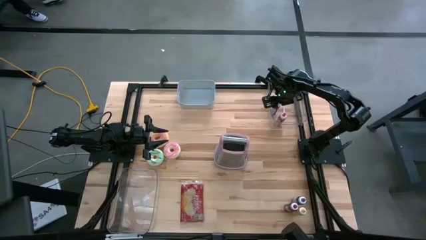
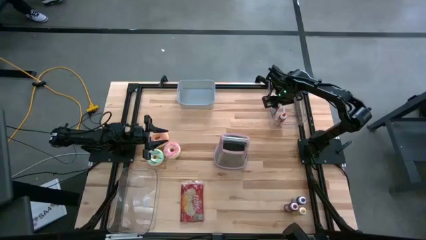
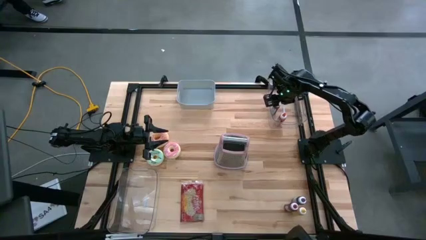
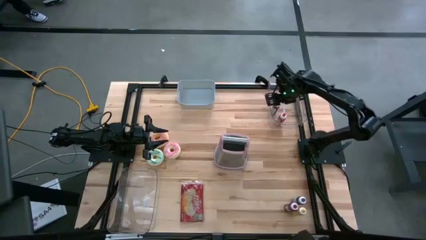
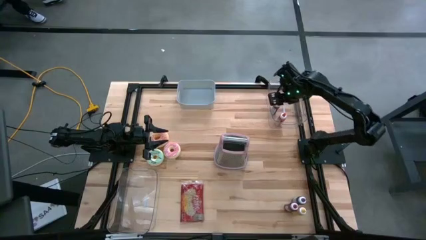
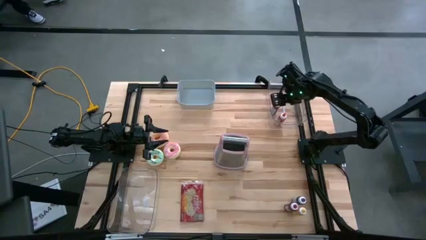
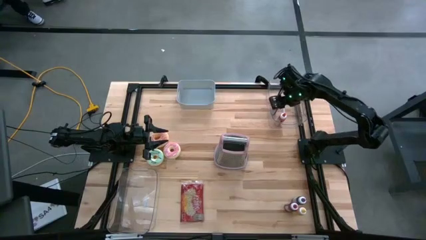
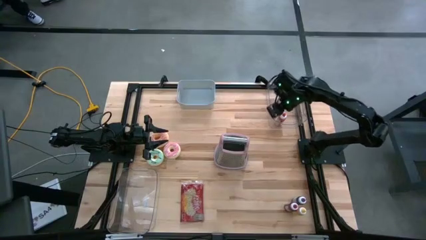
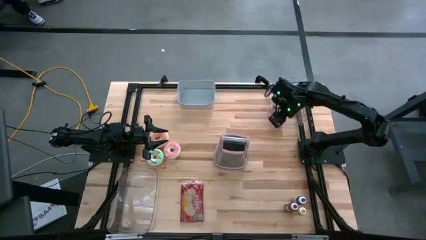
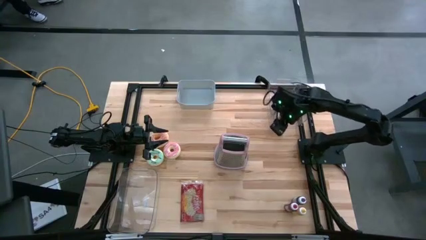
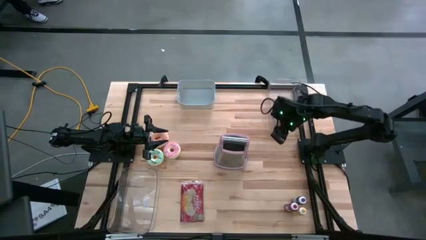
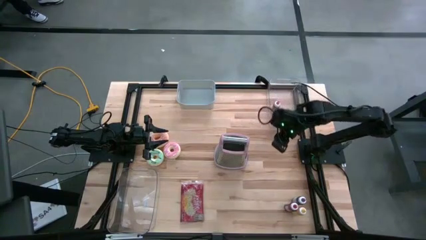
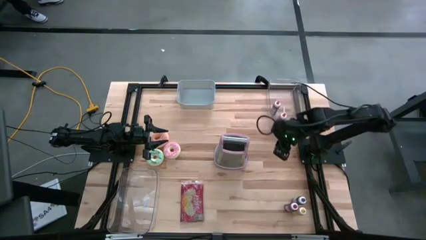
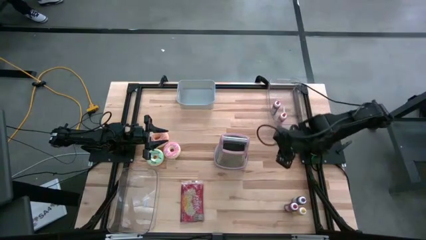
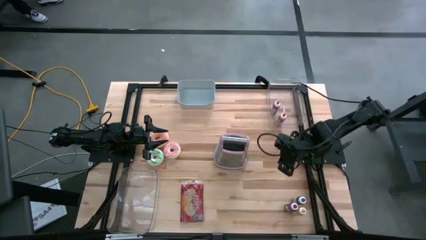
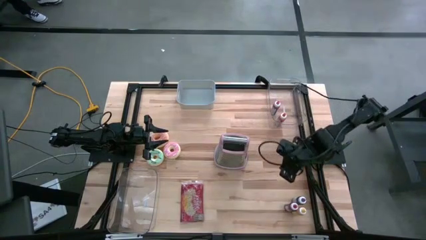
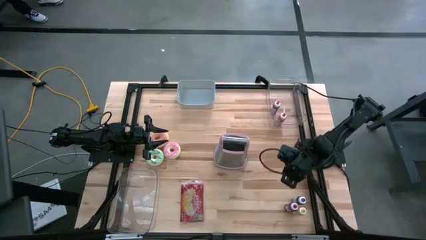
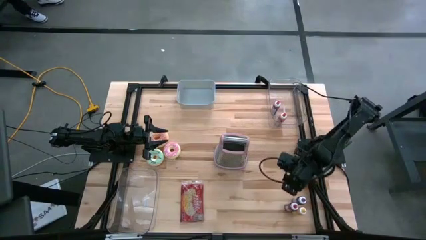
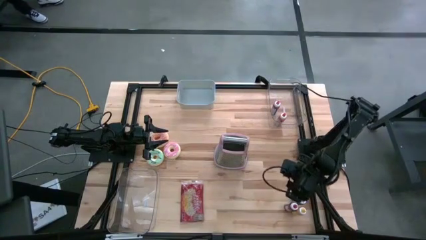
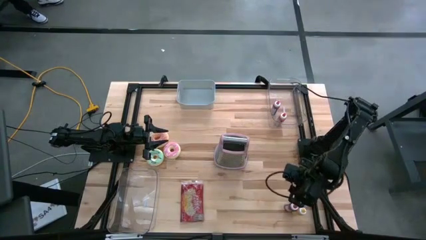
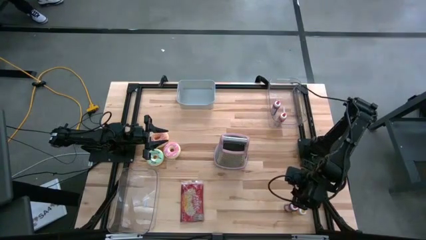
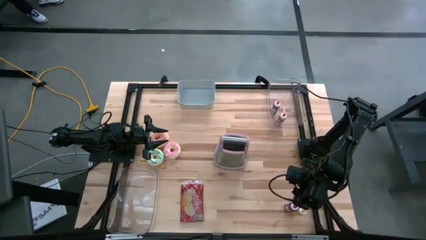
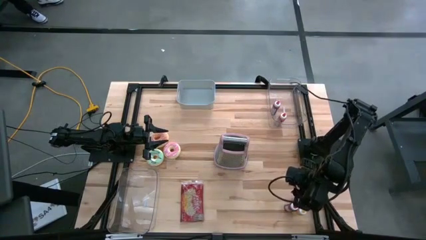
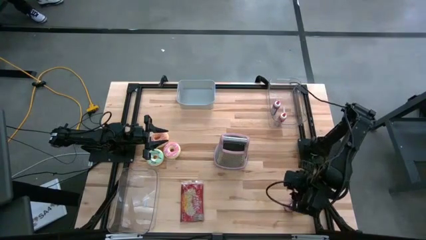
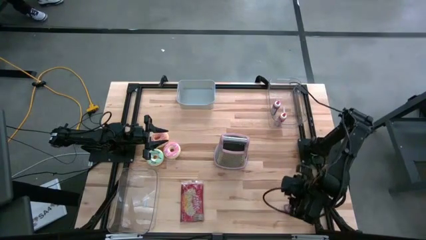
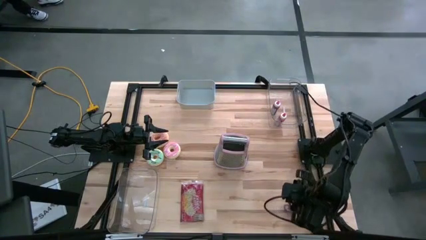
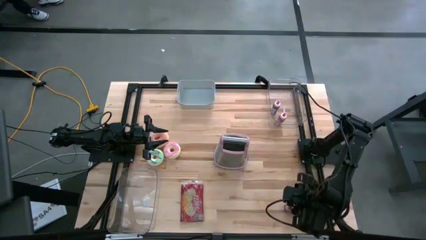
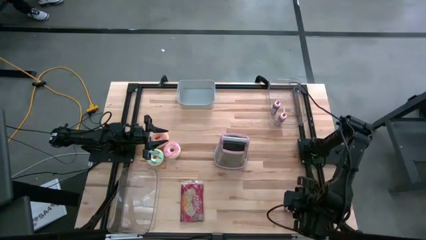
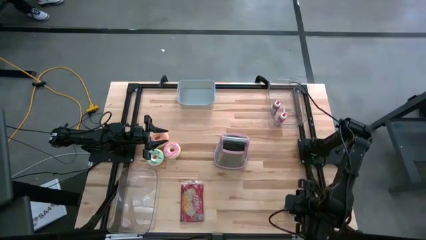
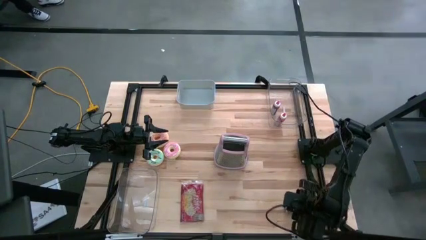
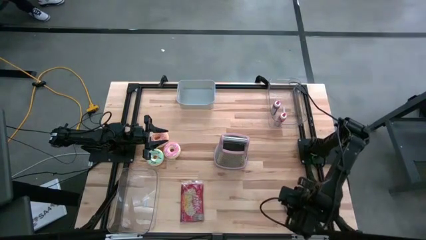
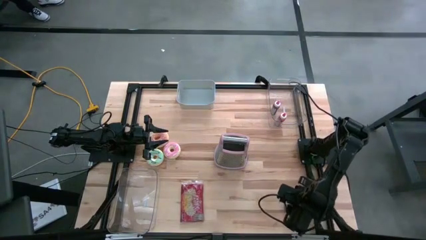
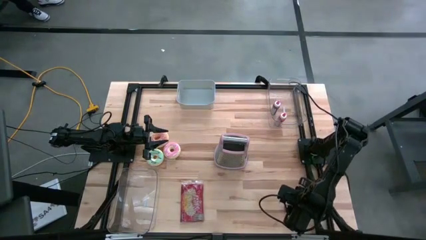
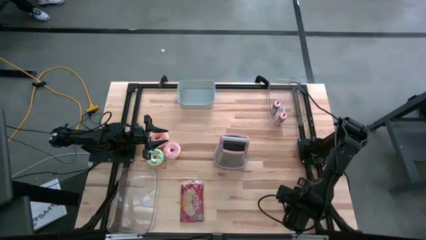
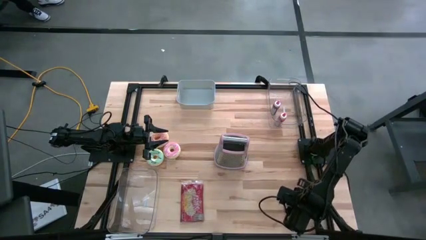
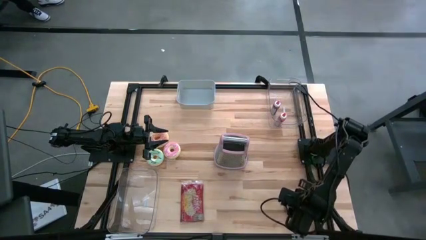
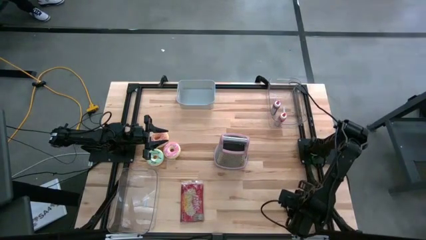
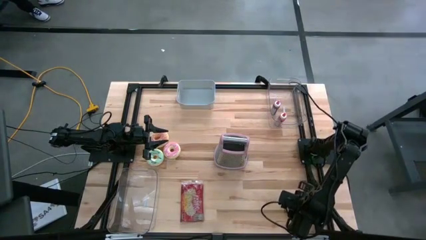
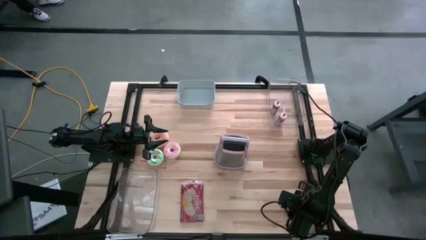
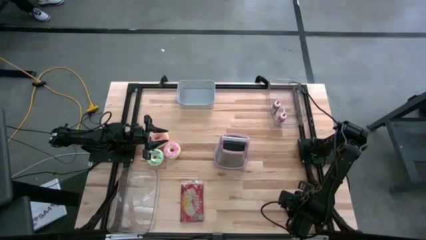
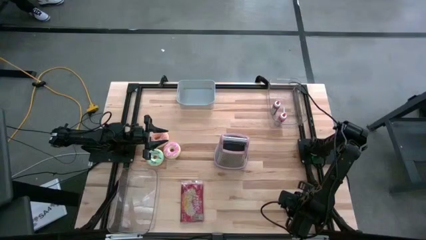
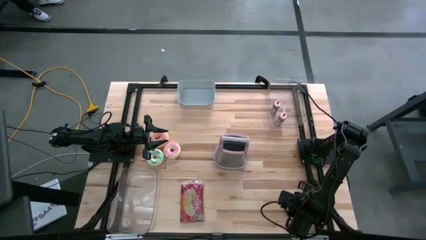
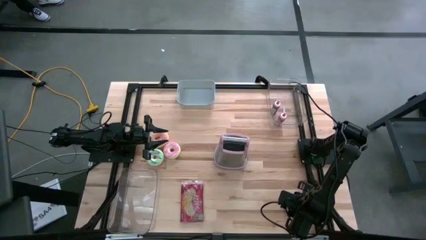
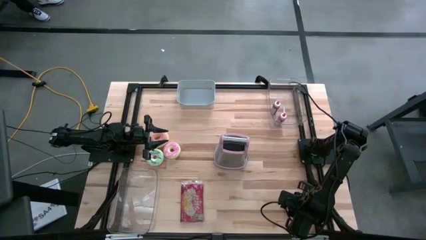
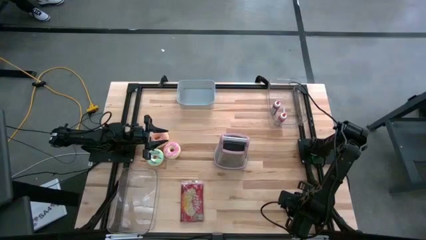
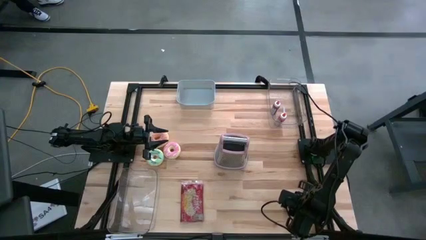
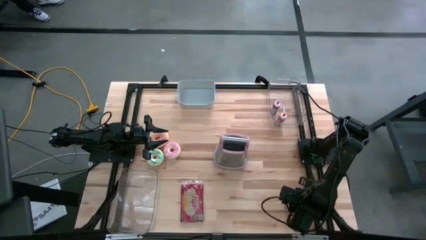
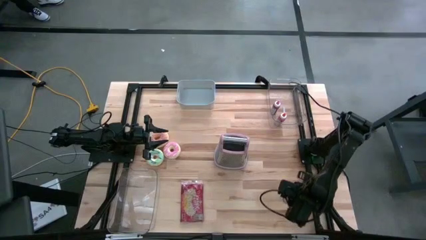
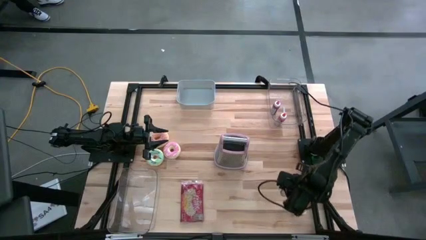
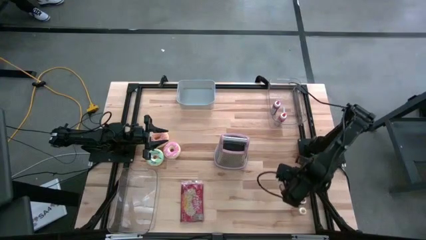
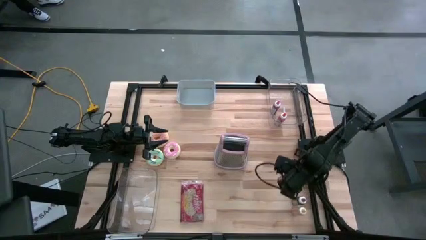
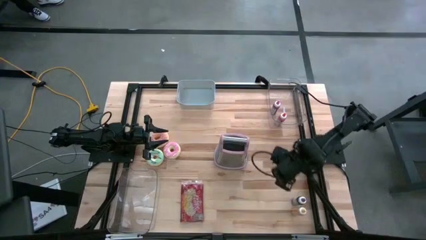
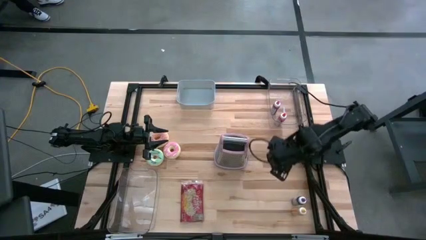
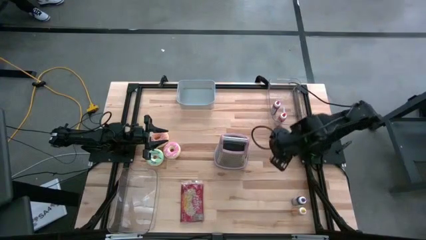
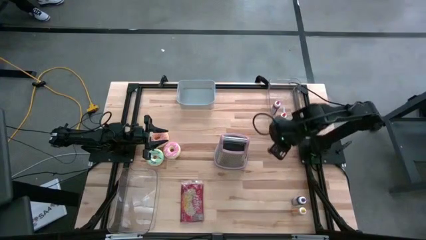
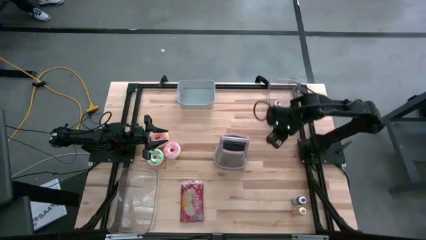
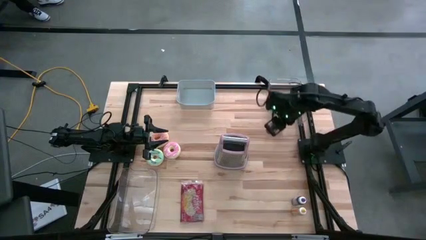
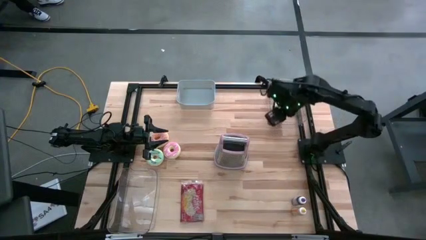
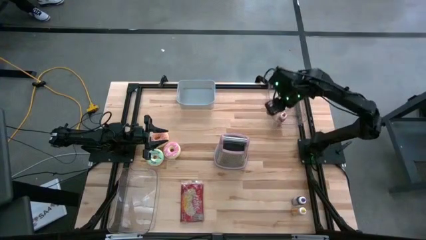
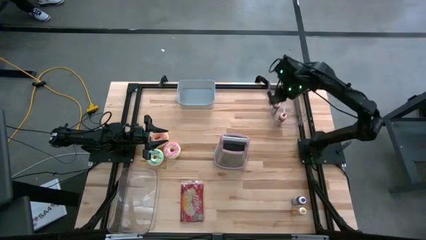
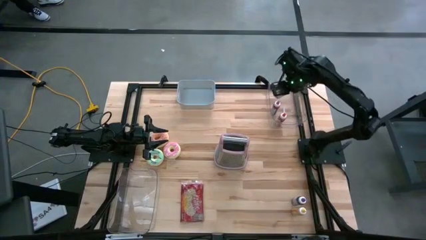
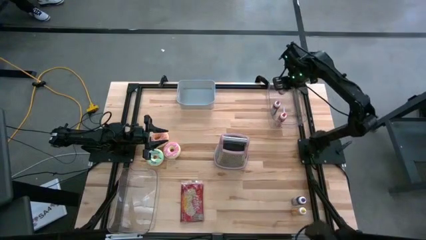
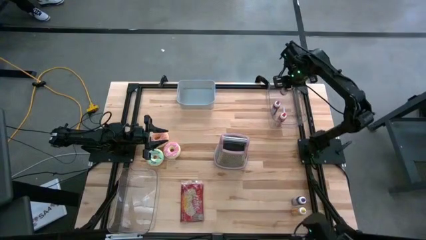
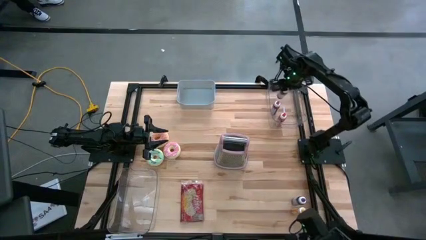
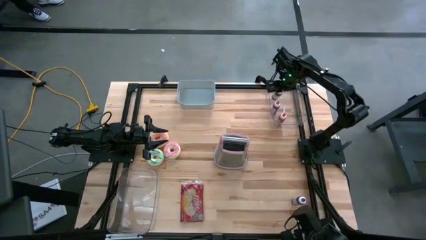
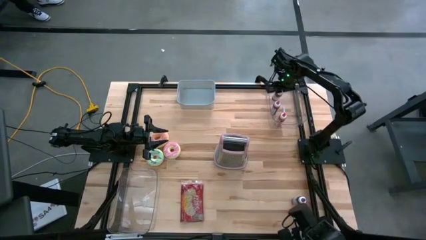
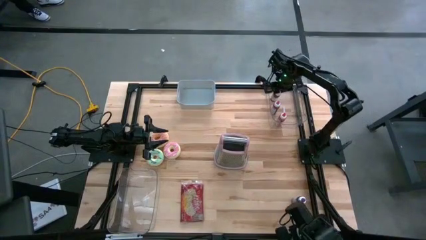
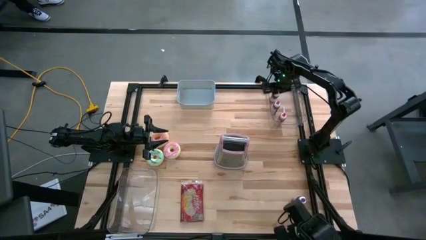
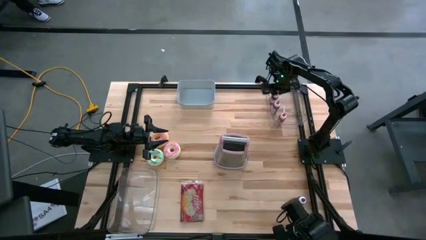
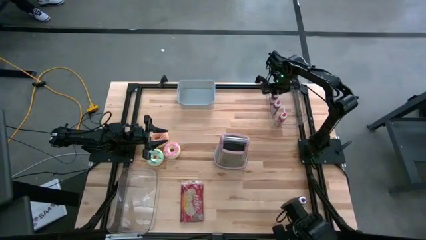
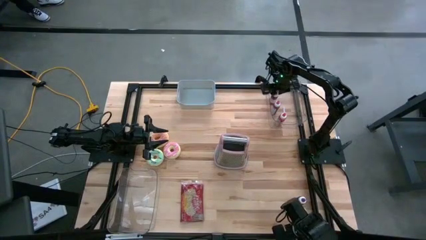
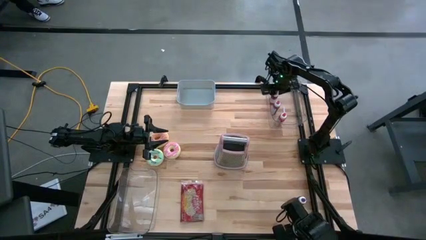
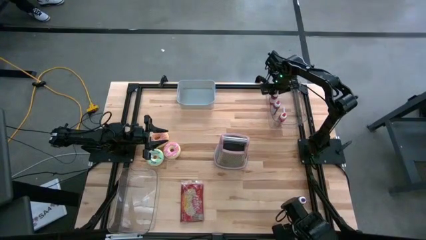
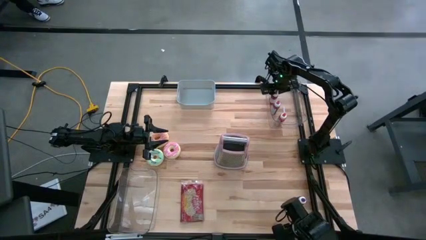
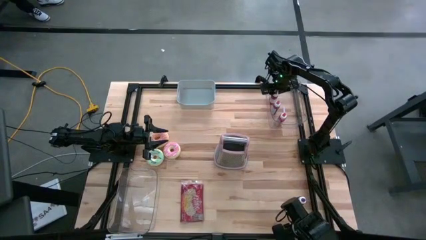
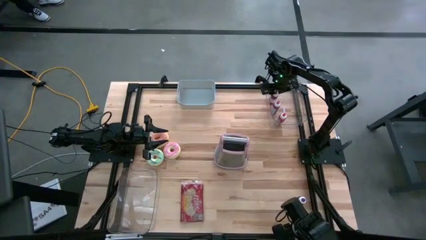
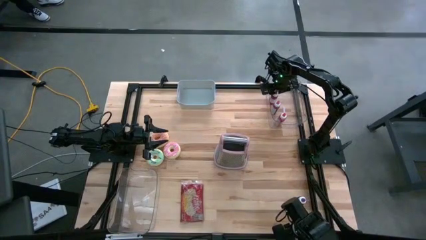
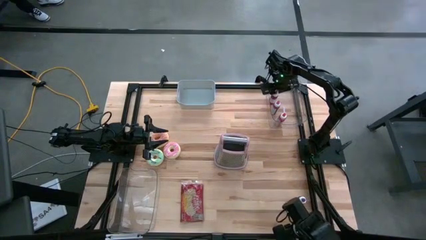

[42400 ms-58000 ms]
Put the red food coloring into the right transparent bin
